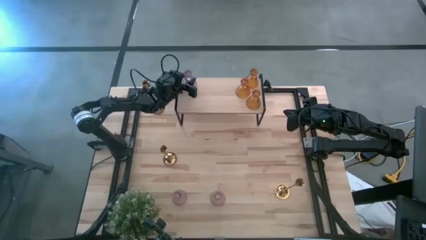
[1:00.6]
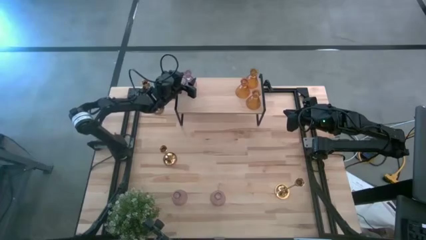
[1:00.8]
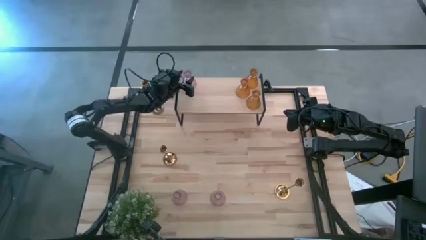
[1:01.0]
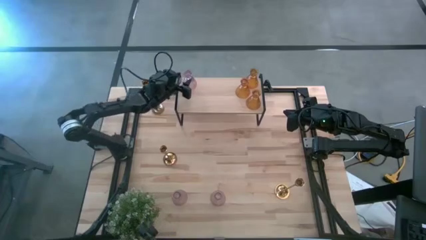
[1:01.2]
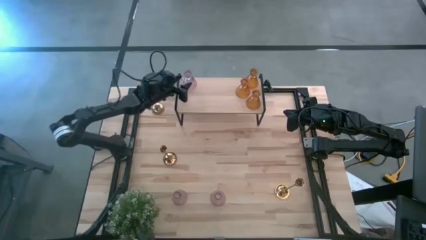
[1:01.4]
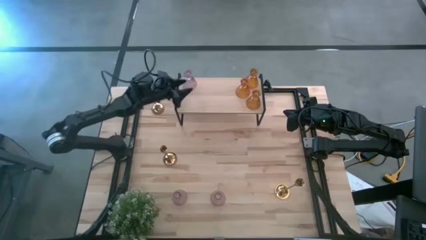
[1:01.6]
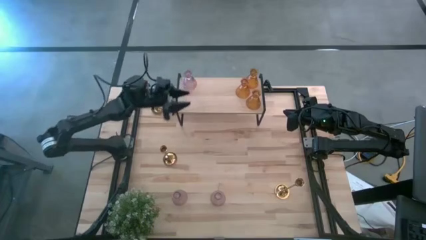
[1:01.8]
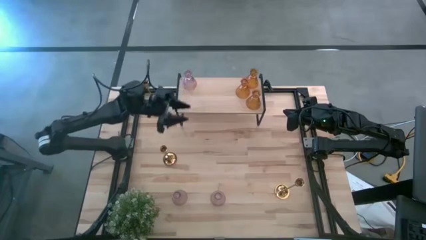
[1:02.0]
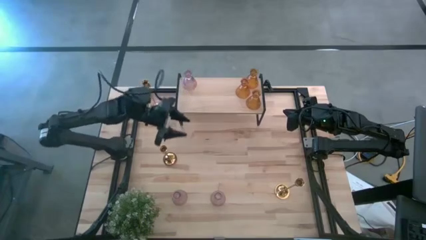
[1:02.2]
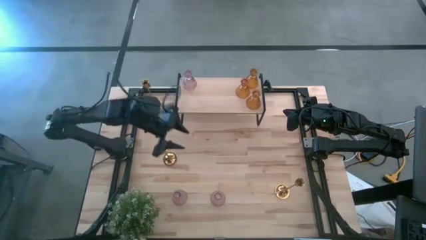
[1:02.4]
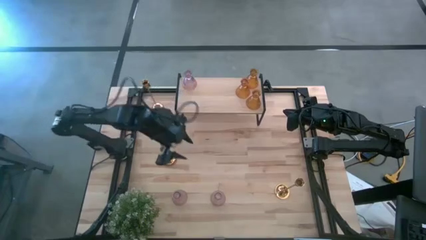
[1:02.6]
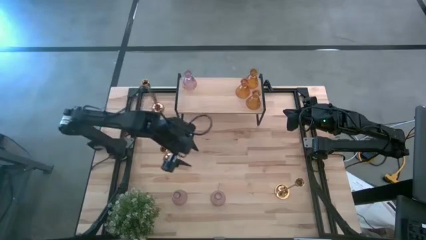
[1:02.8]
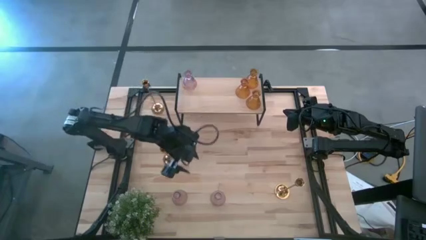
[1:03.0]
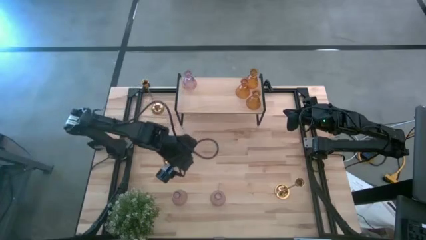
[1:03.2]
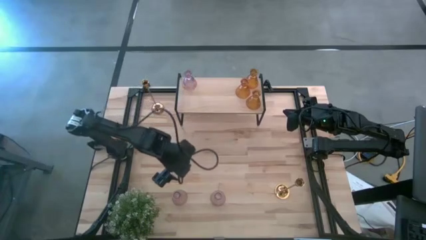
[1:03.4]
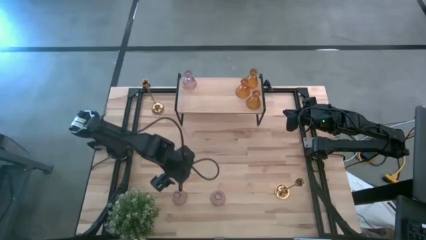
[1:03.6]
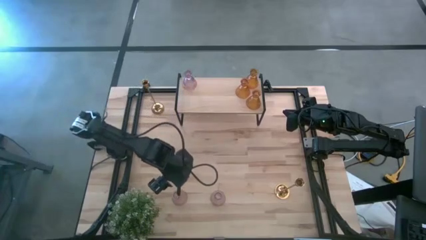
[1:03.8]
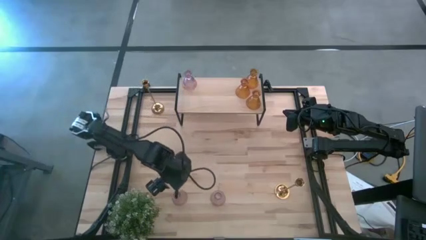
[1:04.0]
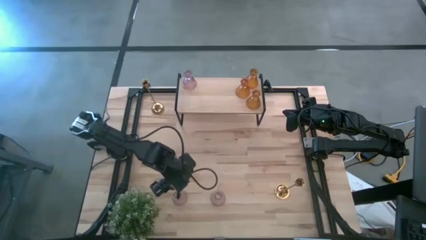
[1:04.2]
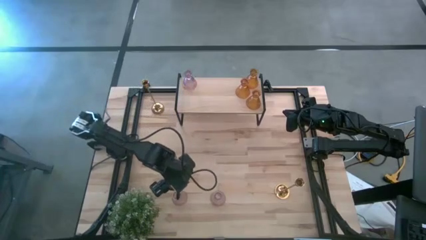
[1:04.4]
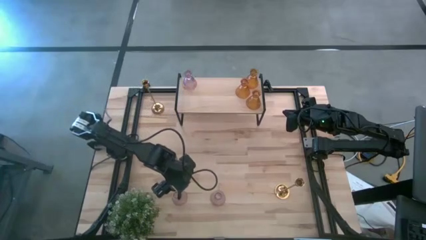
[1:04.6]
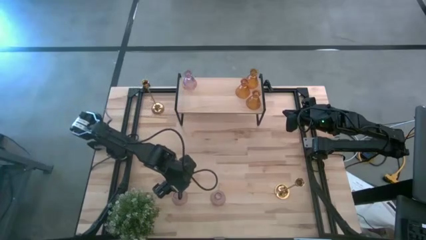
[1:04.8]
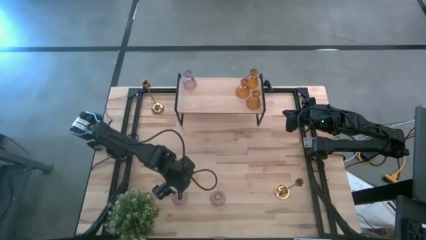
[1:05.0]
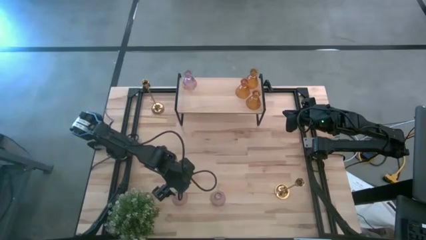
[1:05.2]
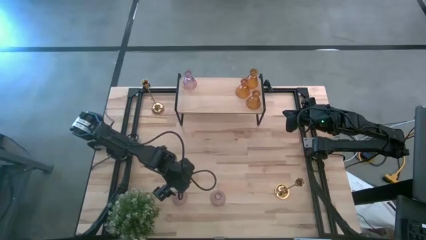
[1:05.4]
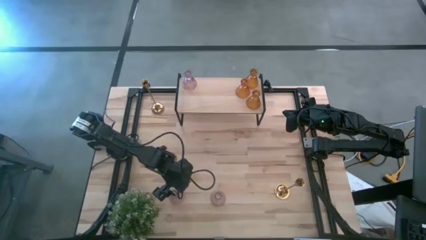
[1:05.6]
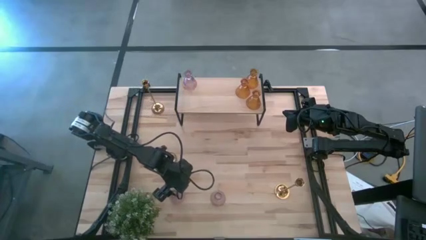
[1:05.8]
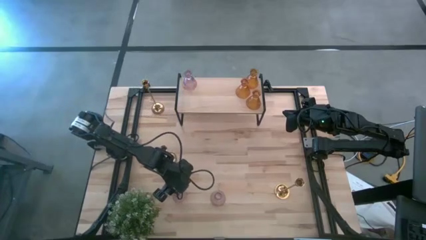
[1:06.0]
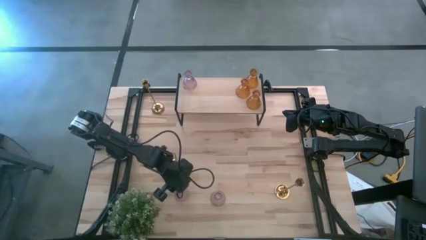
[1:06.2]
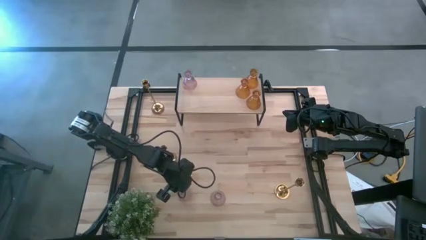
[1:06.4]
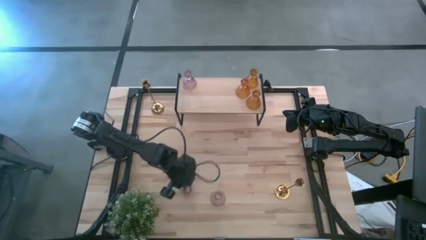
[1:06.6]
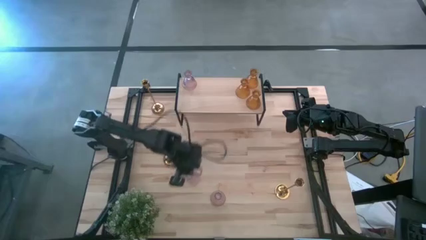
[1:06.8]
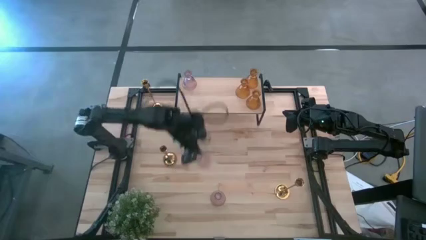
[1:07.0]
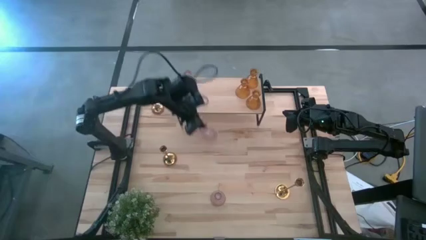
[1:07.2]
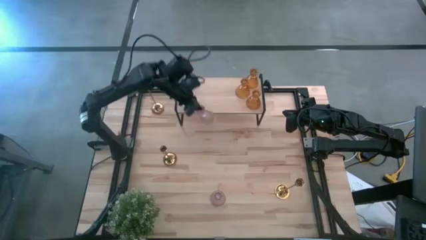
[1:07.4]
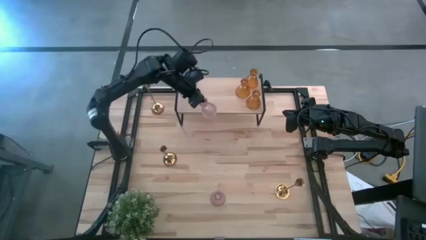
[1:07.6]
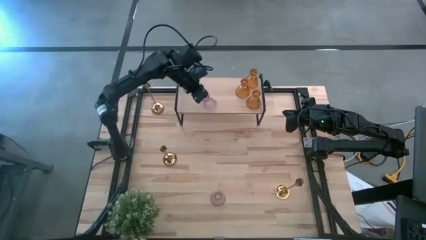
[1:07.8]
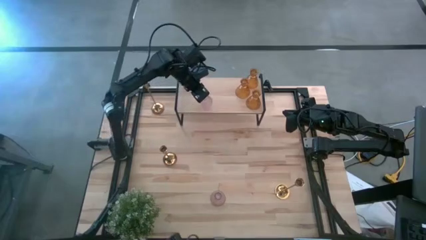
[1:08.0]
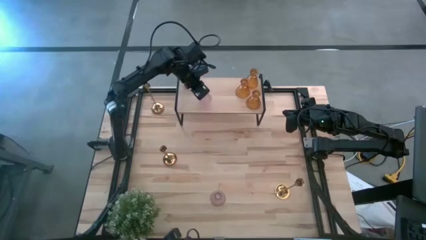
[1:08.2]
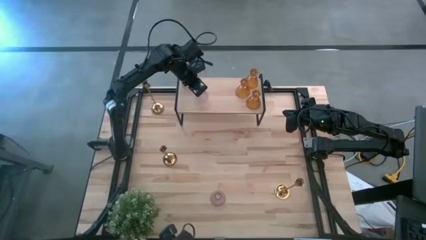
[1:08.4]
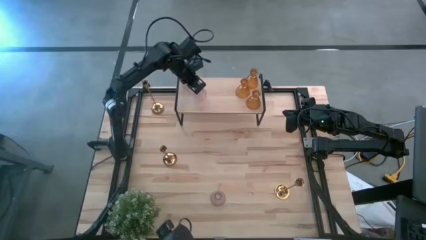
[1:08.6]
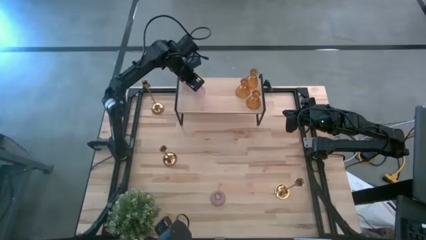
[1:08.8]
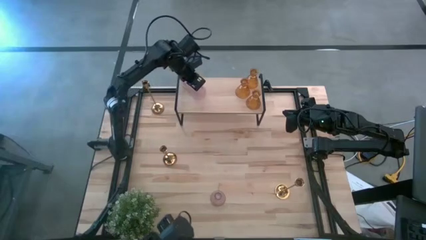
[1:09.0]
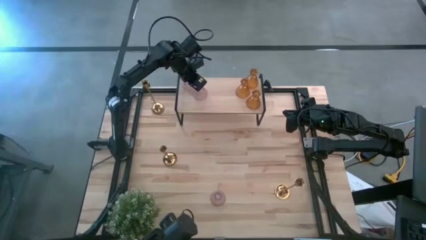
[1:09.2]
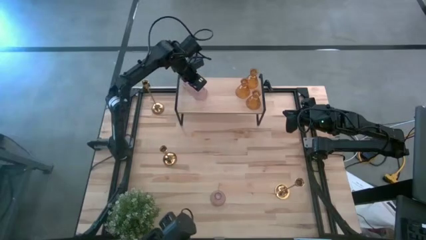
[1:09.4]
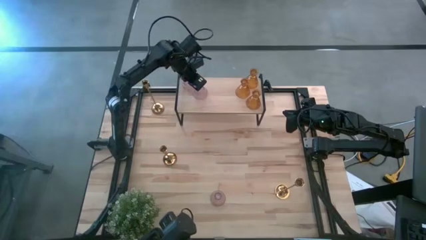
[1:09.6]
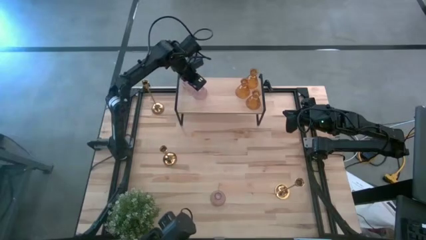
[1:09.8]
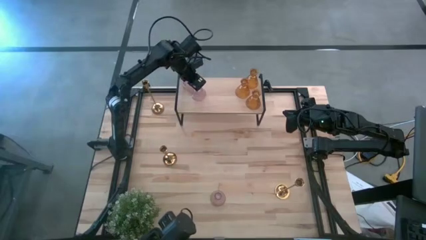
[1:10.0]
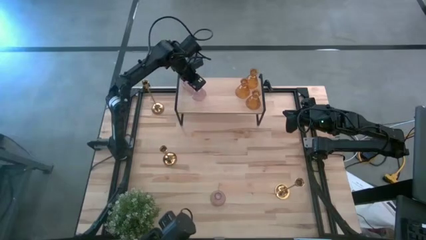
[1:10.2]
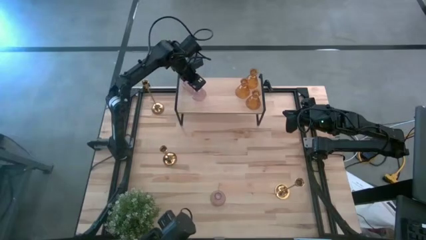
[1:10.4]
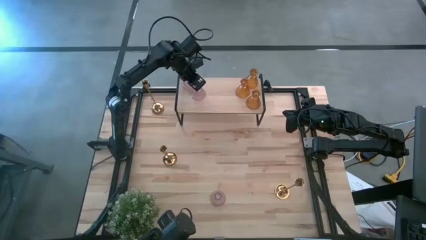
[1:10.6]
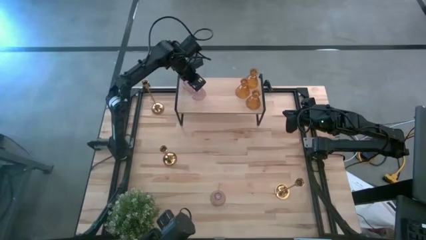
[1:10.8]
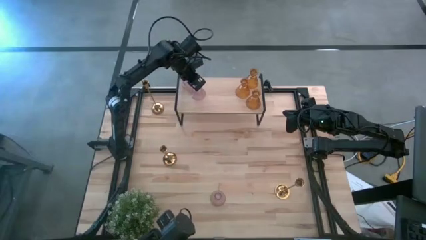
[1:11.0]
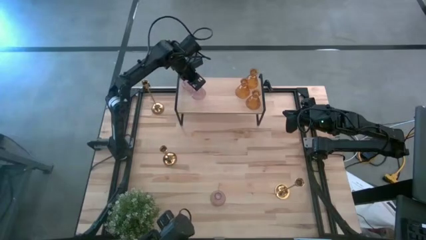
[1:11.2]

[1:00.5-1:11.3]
Task: Pick & Place candle stick holders
Put the left purple glass candle holder on the shelf

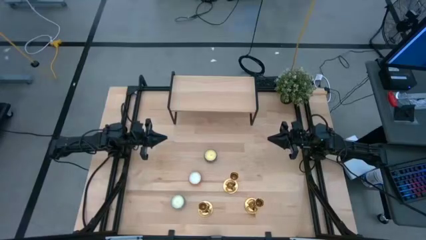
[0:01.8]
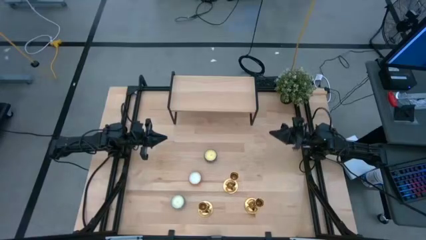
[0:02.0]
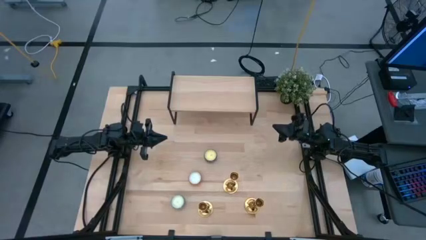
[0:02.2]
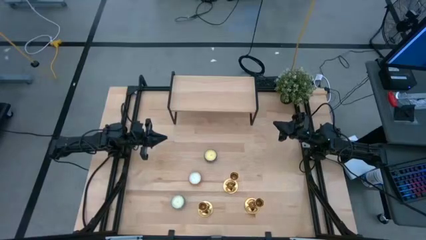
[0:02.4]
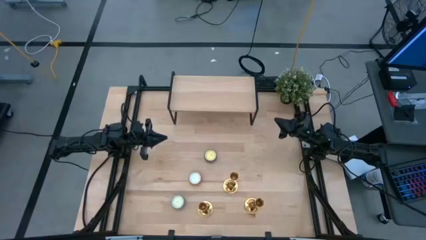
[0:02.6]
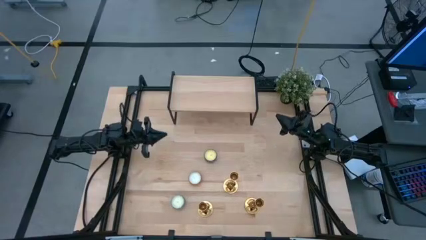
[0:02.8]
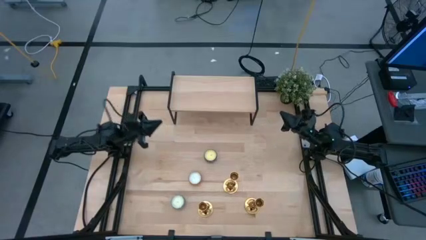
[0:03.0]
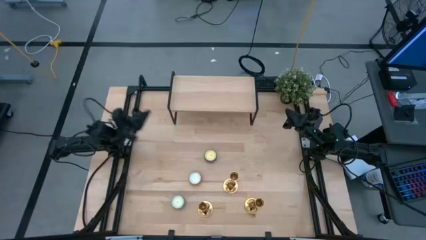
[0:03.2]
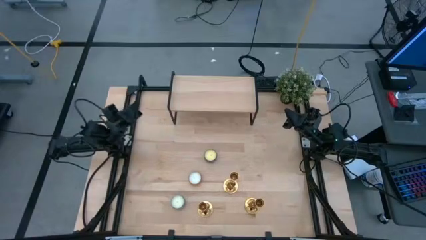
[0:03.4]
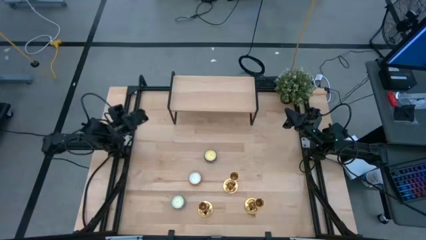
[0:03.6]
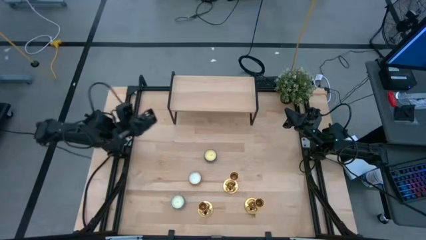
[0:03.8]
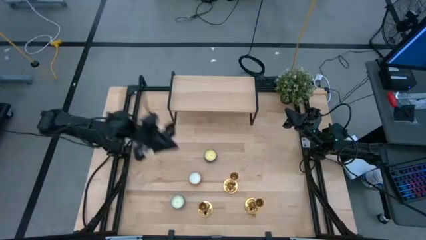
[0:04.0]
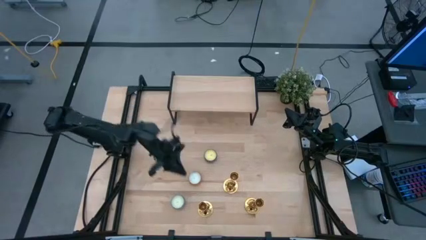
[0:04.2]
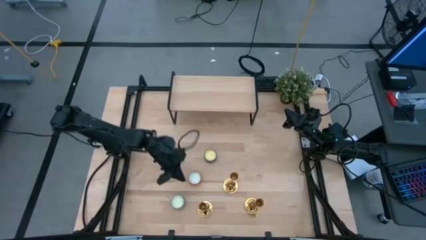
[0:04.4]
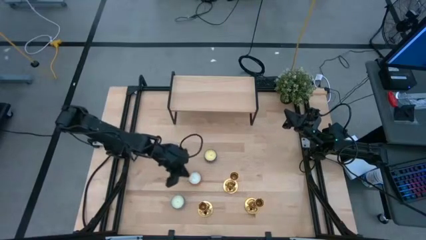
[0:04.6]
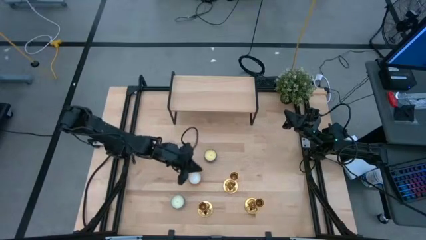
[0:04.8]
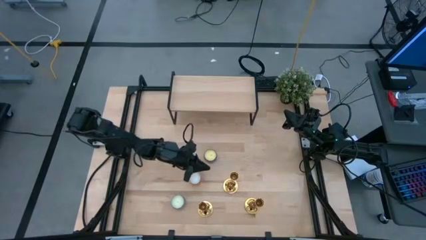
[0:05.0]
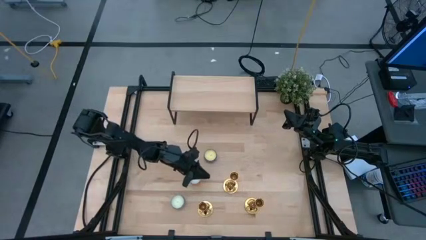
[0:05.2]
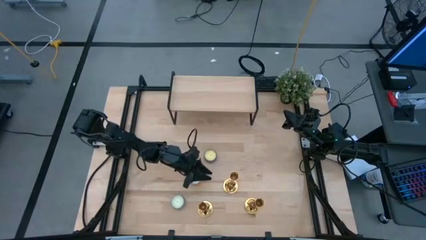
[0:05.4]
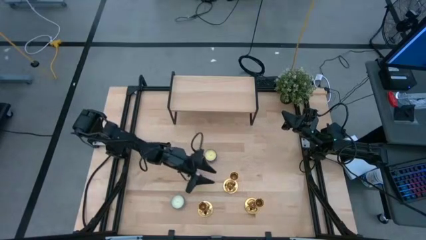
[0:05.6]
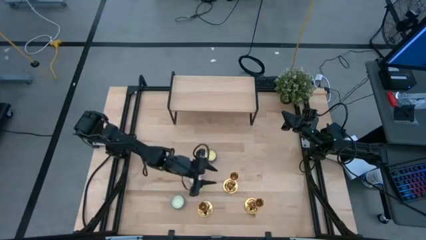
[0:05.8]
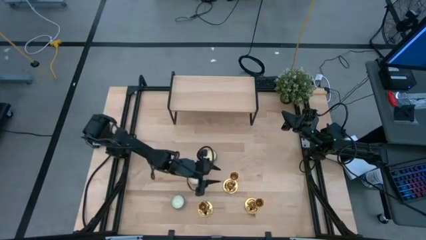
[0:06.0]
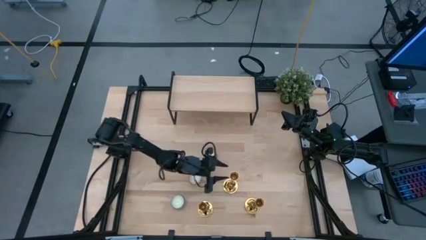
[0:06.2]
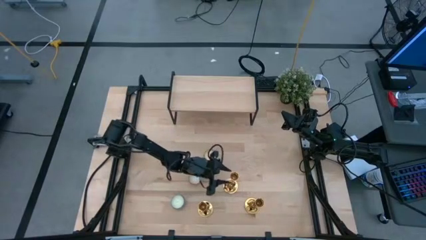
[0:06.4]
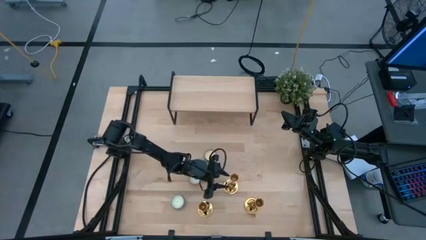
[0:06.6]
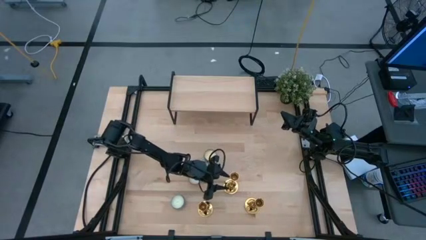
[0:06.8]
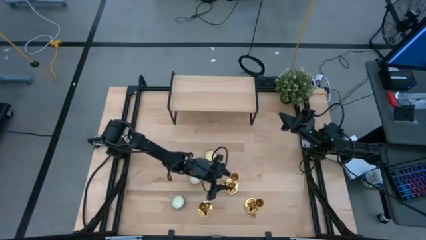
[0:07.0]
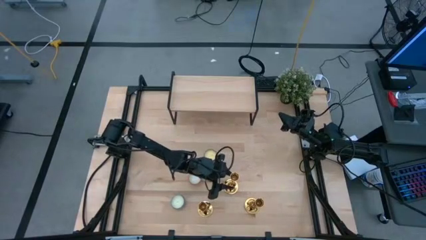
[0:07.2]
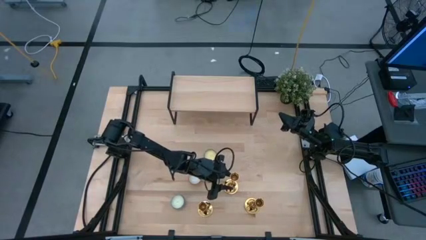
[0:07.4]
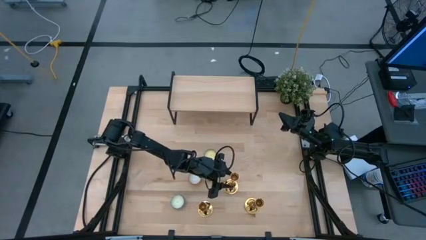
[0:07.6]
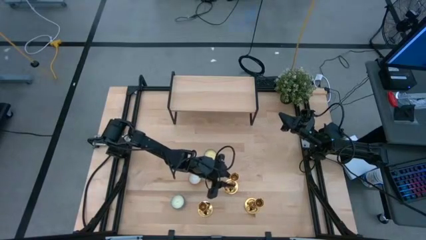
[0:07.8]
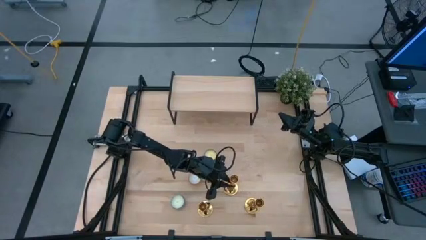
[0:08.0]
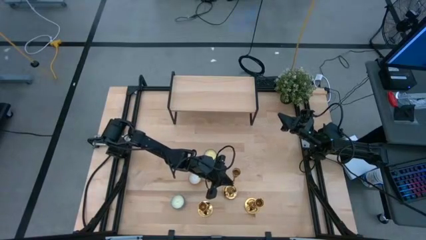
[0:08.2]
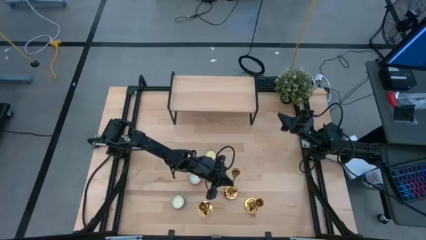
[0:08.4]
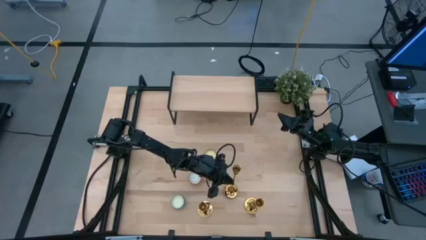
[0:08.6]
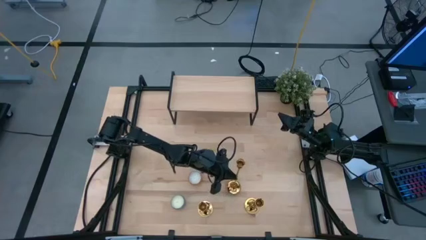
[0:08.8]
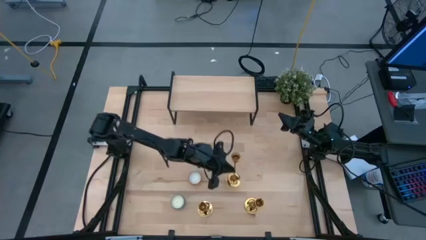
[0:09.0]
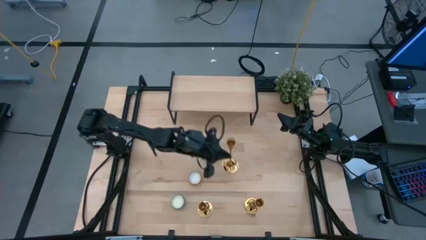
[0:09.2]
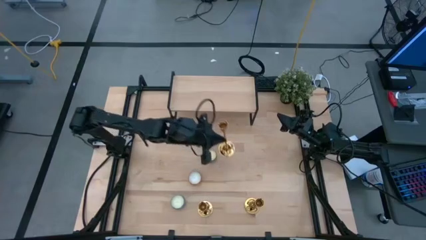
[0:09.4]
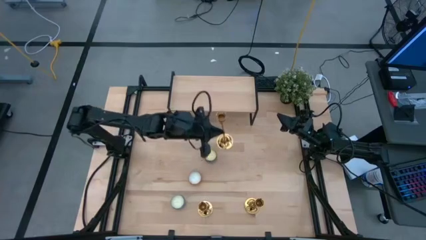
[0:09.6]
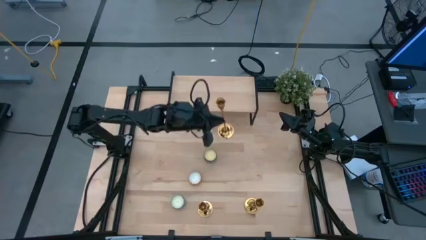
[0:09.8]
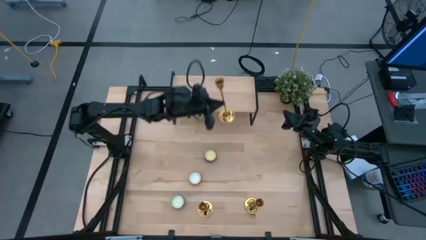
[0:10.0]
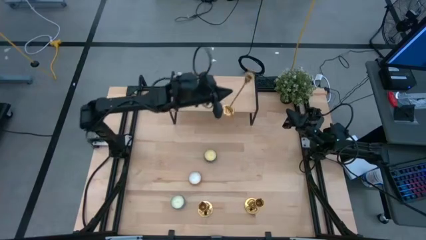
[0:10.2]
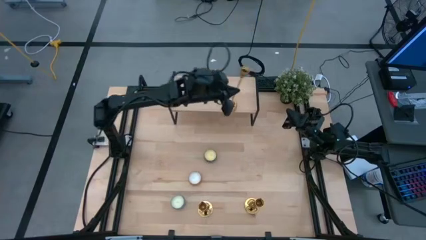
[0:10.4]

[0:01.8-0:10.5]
Task: Pick & Place candle stick holders
Put the top gold candle holder on the shelf
